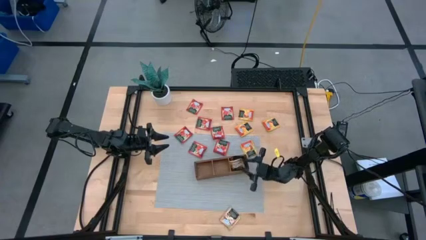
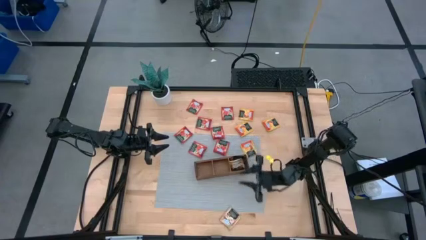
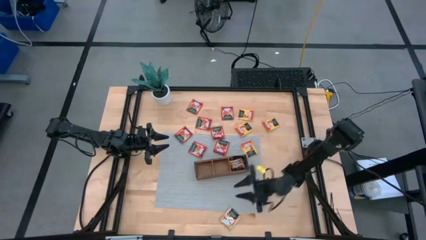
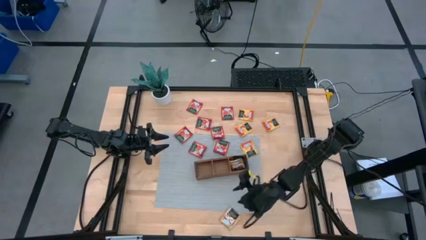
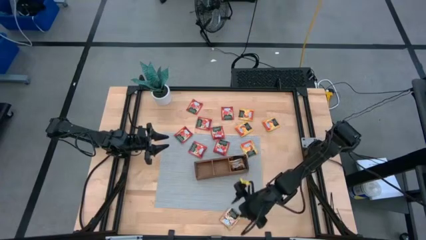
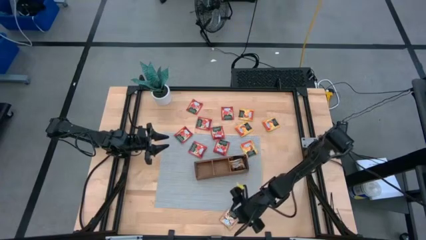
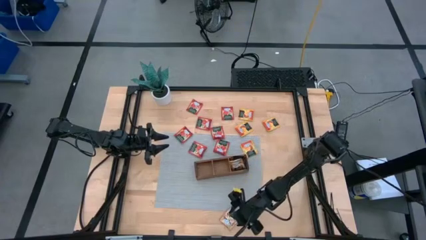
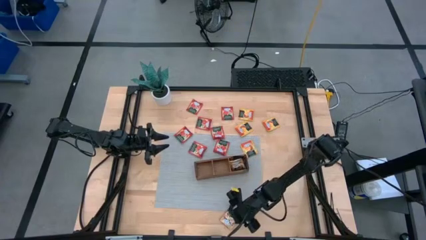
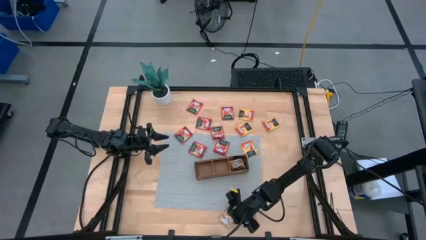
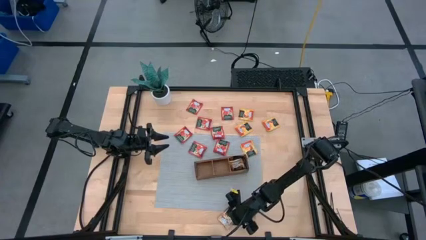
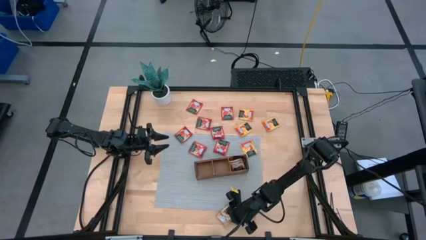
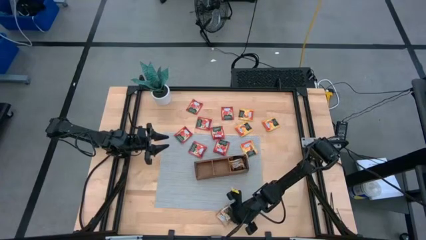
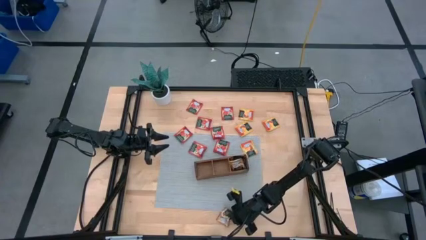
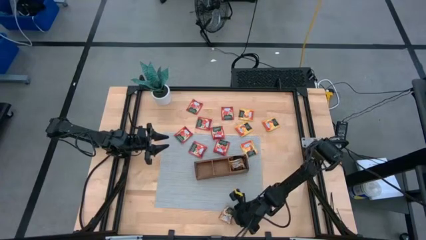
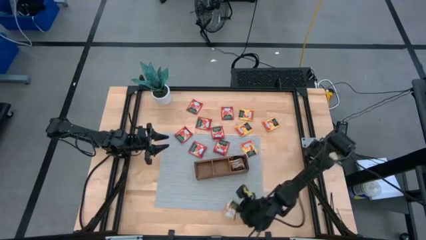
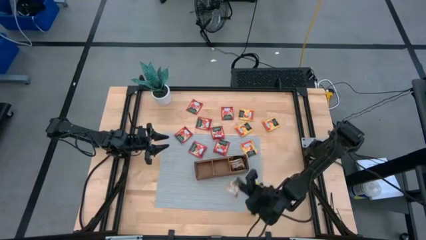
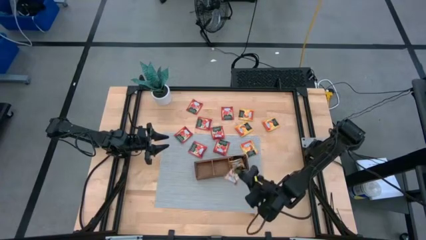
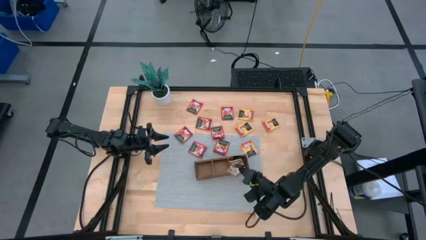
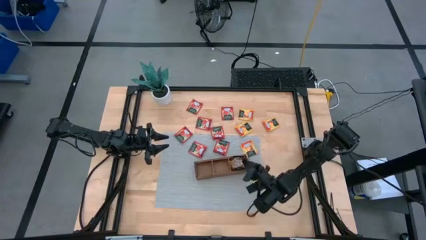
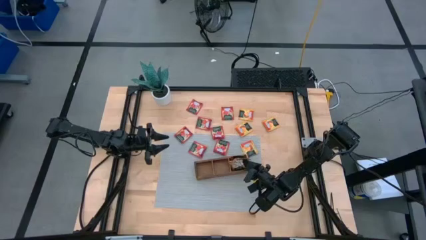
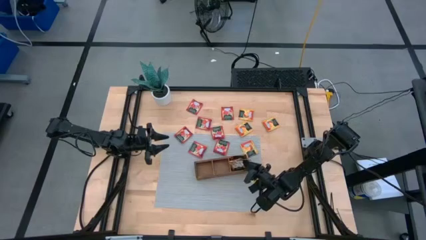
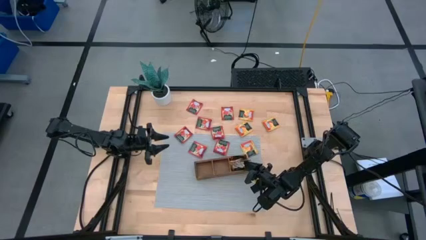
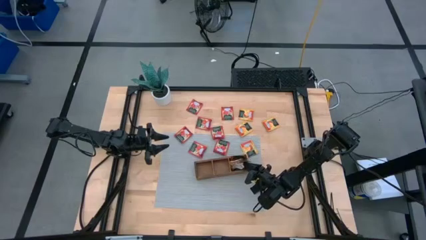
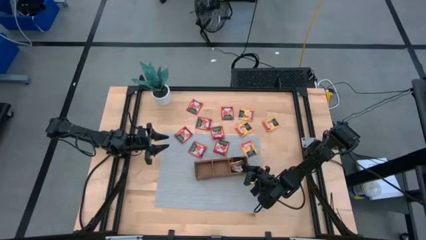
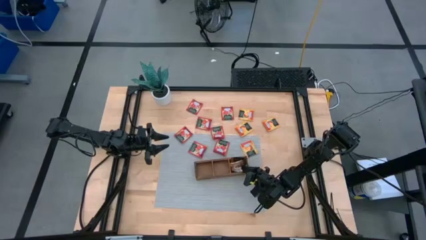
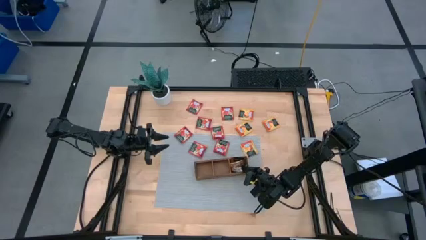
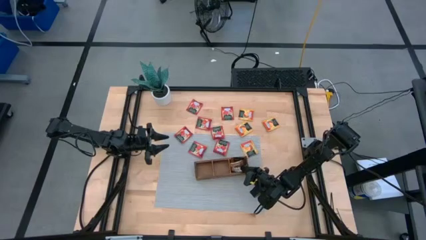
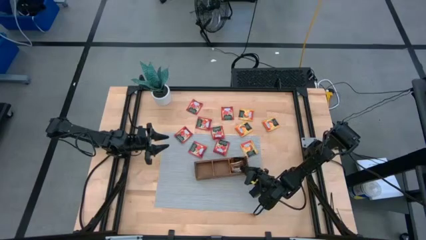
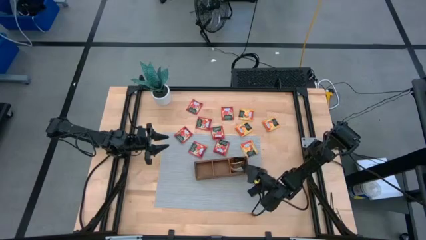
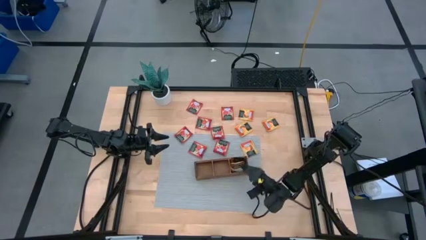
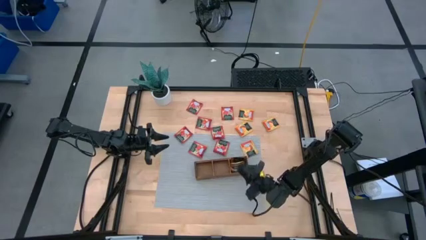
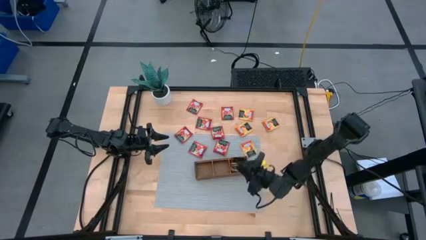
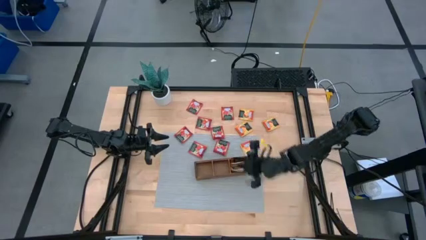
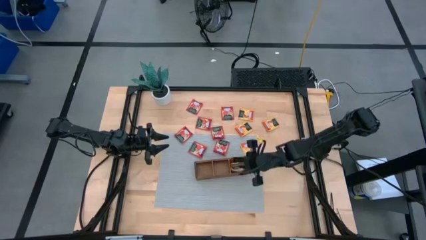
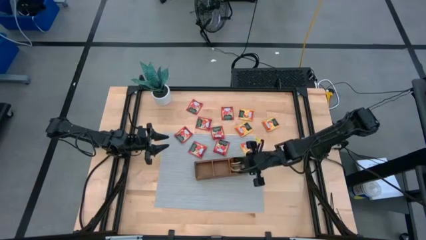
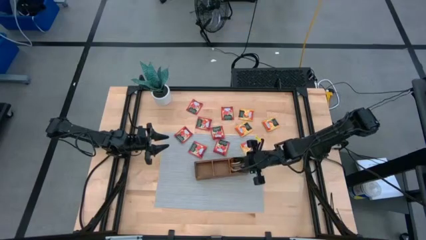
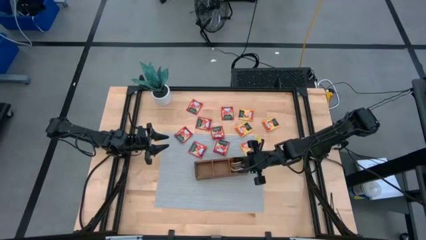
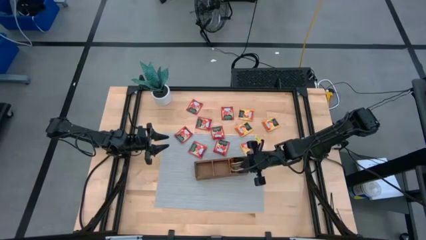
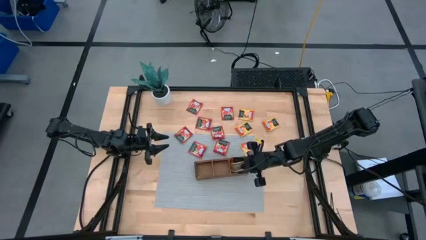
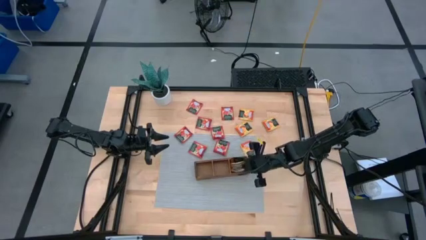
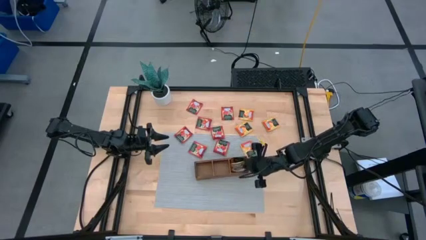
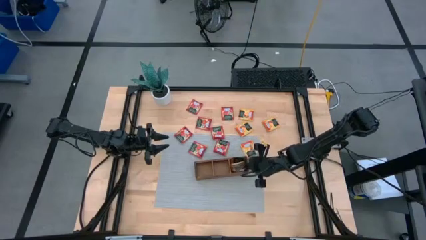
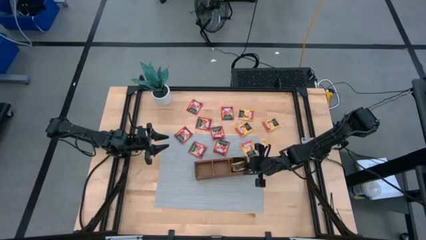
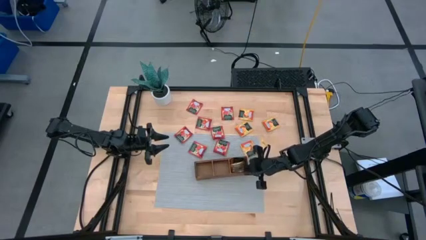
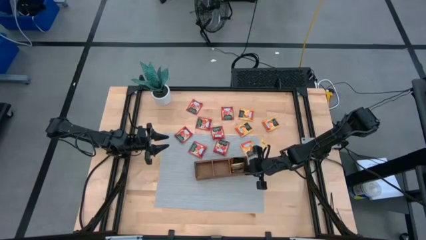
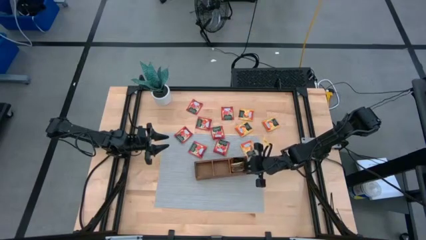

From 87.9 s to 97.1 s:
Task: Pick & Place Tea
Put the brown tea bag into the right compartment of the wood organizer

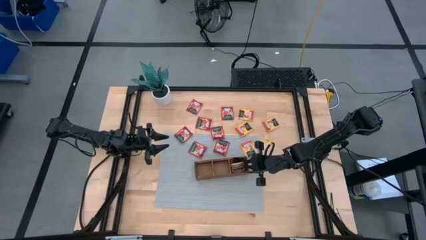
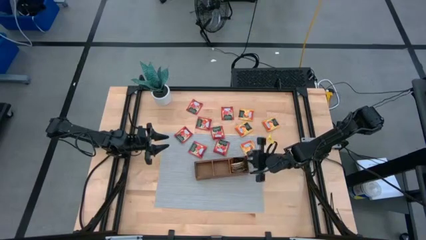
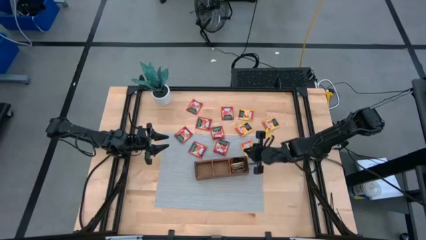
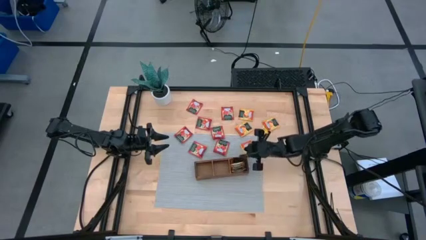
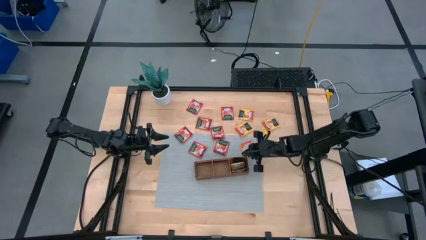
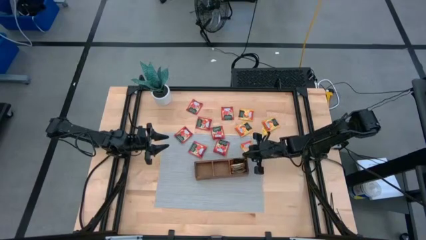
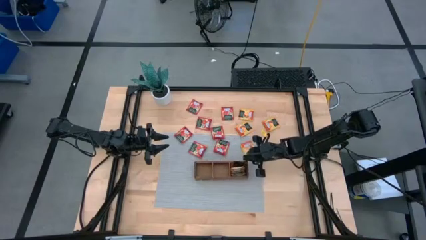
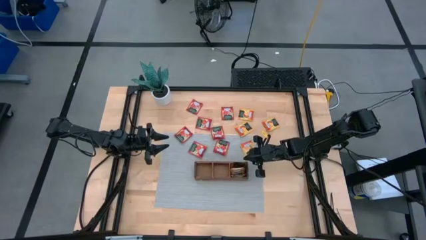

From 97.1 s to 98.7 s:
Adjust the wood organizer

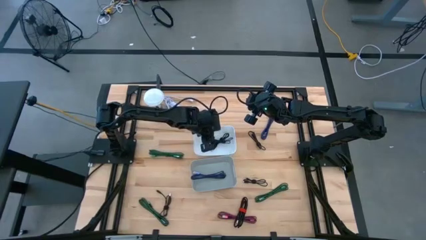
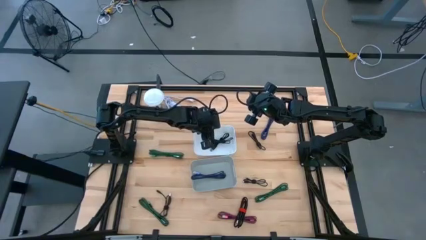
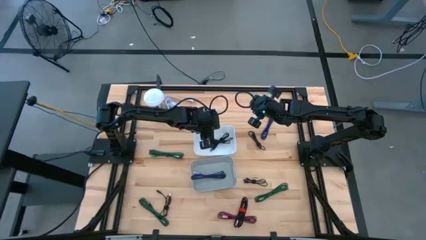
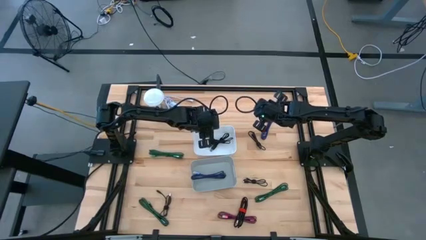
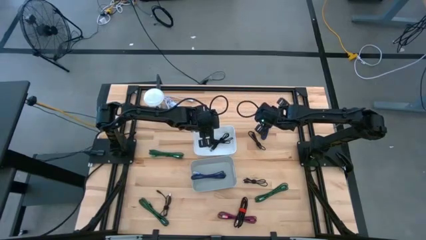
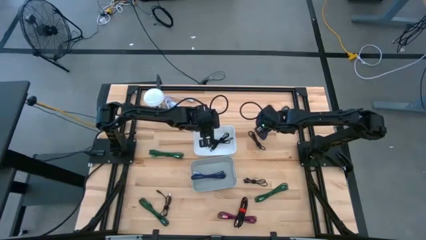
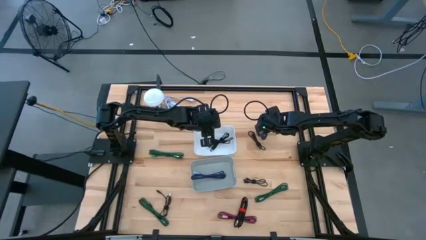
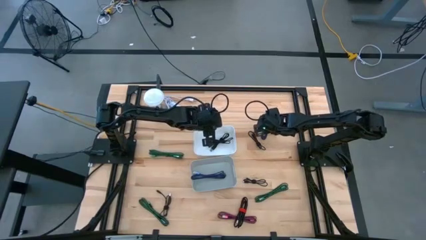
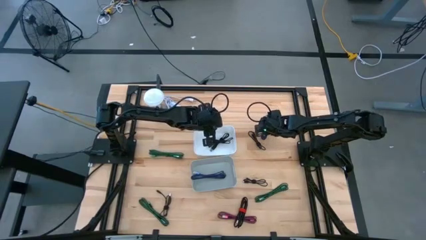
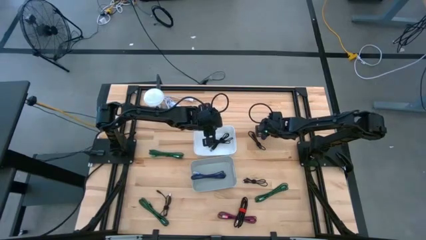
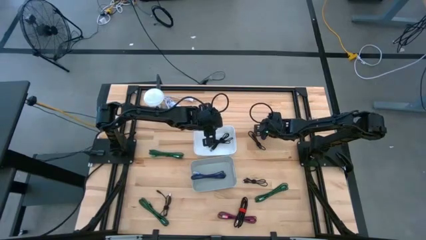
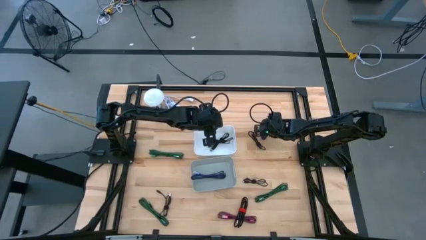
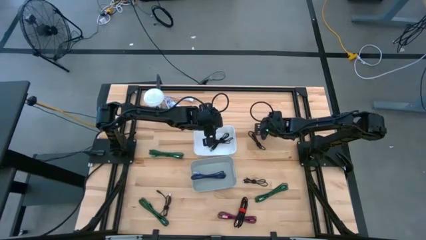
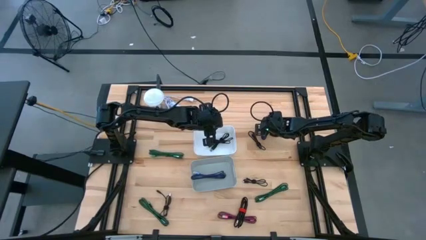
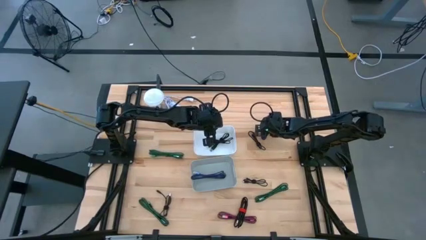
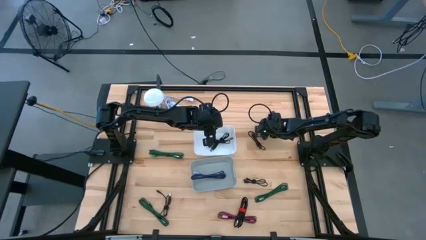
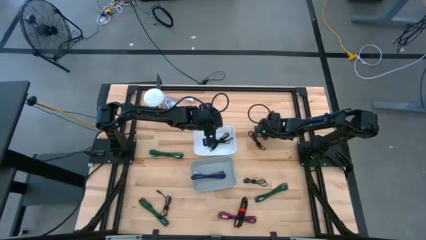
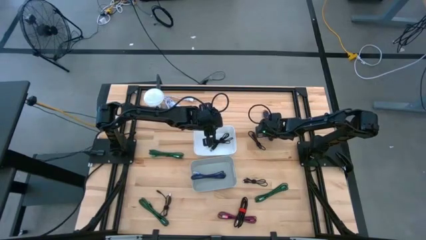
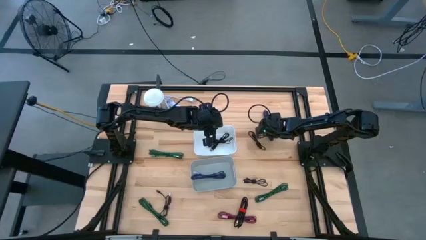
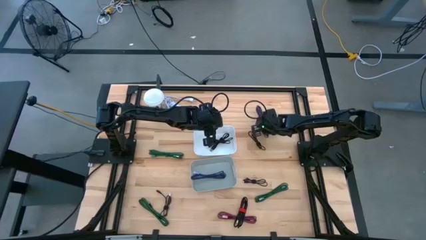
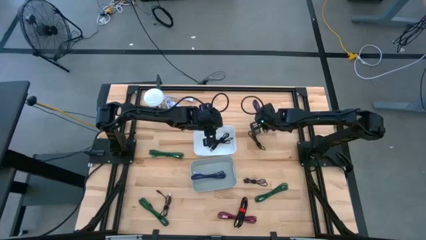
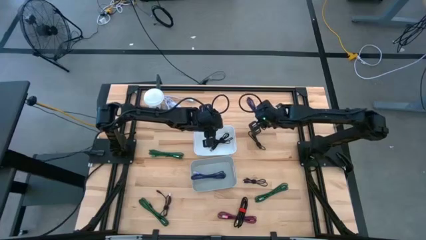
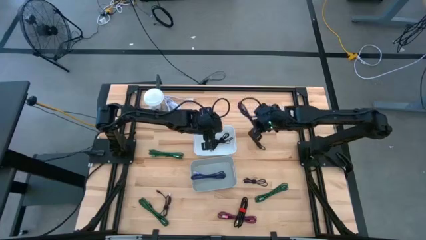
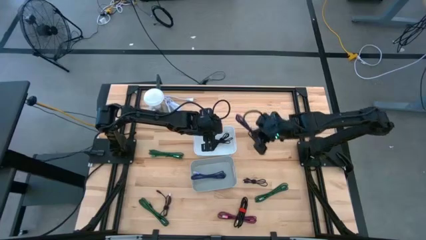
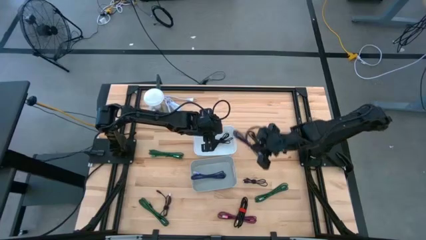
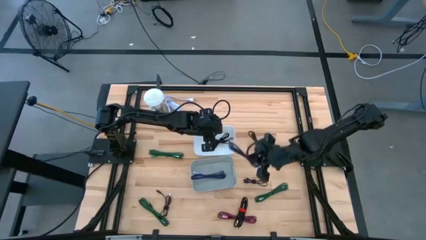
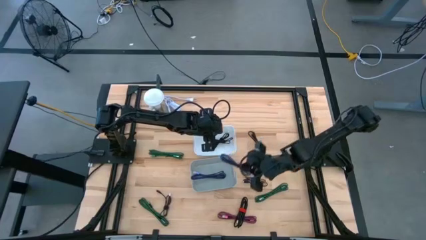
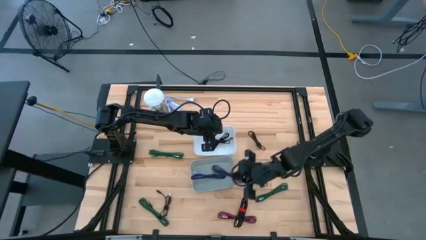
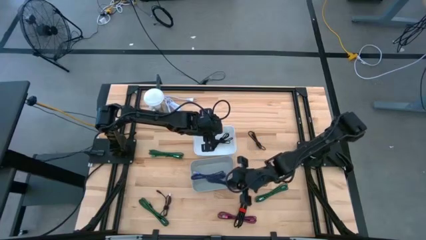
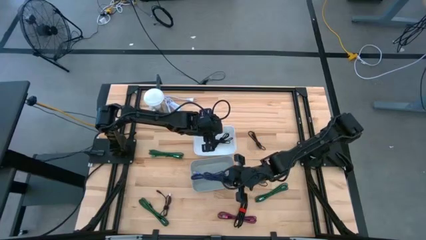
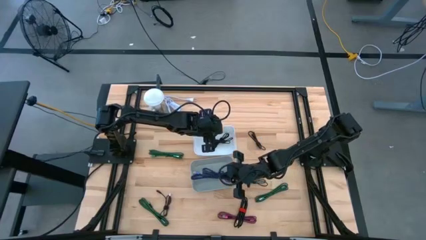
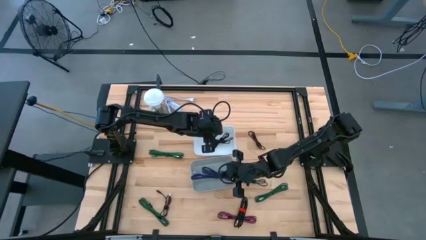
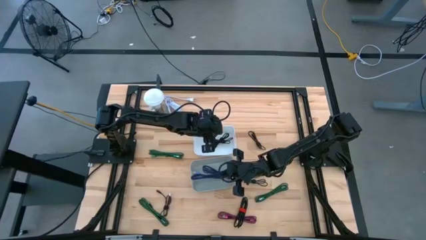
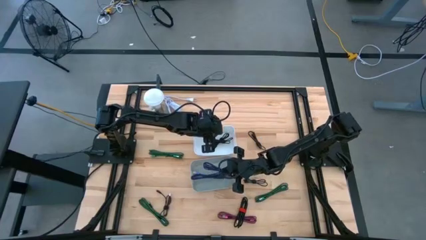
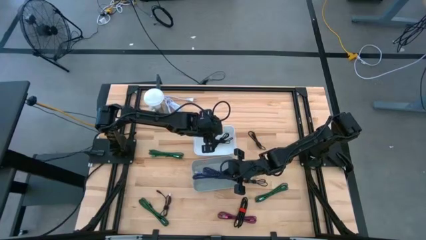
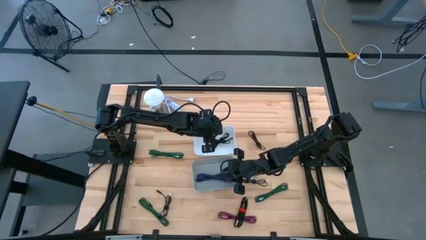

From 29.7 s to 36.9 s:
Task: Pick & Place USB Port
Put the violet charger cable into the gray container
